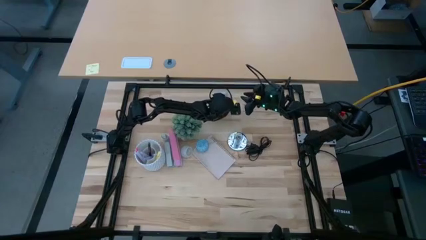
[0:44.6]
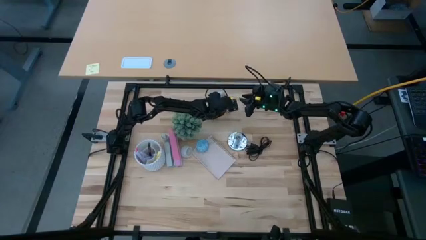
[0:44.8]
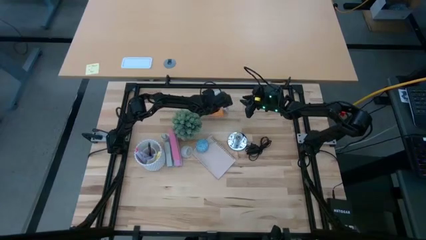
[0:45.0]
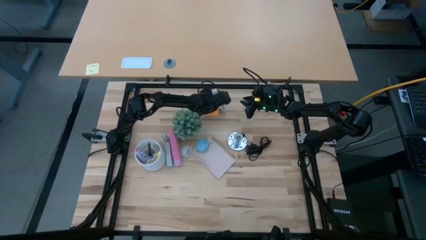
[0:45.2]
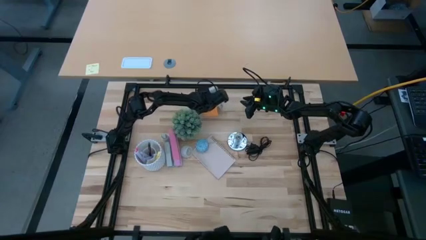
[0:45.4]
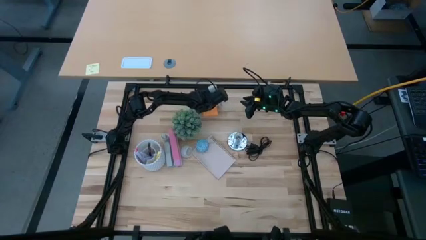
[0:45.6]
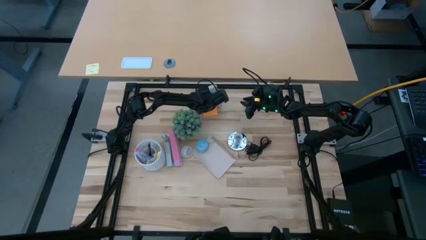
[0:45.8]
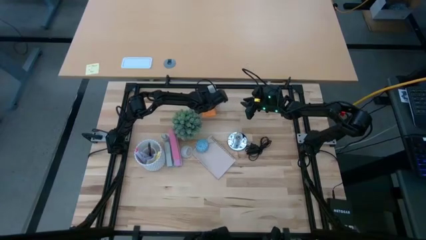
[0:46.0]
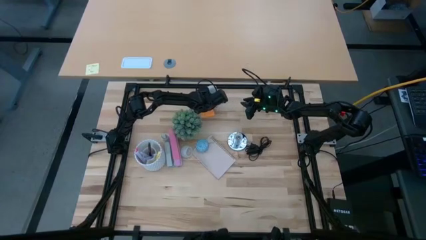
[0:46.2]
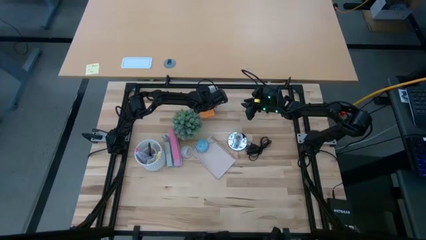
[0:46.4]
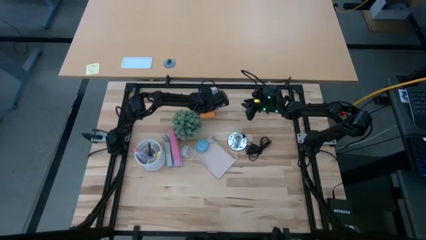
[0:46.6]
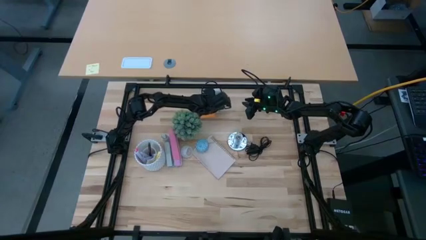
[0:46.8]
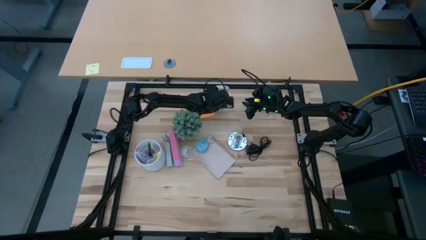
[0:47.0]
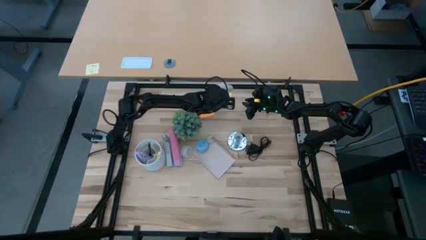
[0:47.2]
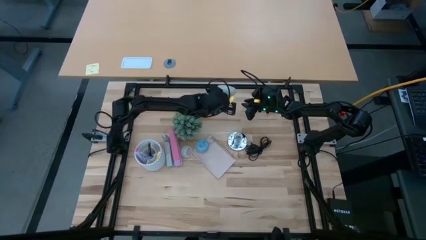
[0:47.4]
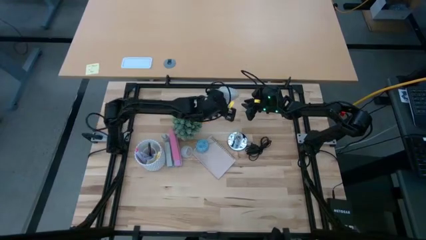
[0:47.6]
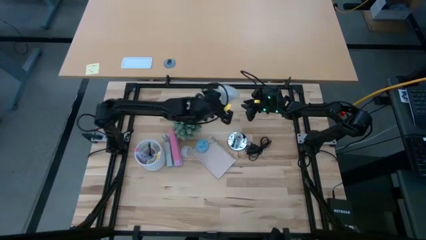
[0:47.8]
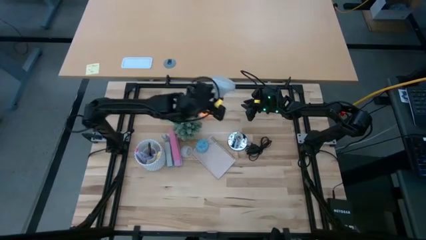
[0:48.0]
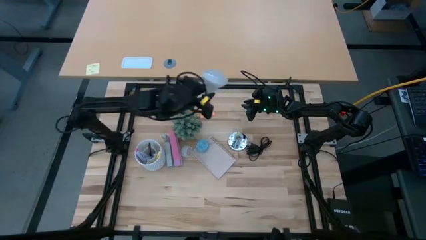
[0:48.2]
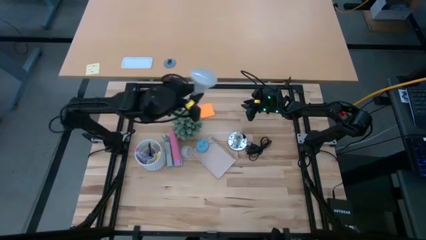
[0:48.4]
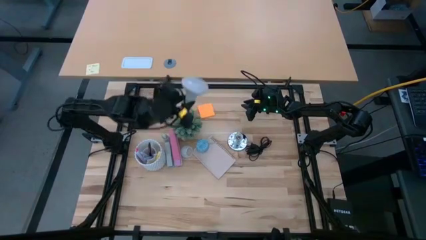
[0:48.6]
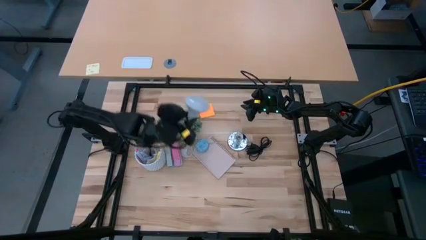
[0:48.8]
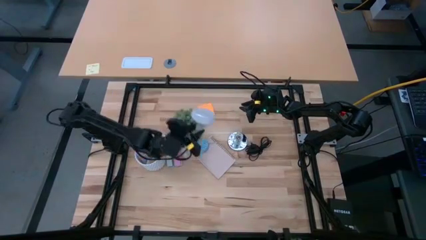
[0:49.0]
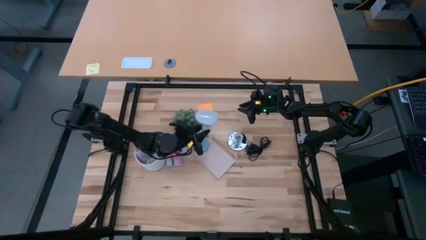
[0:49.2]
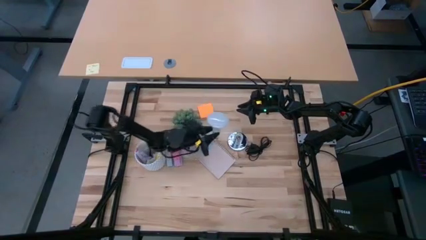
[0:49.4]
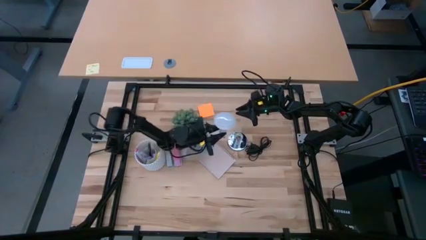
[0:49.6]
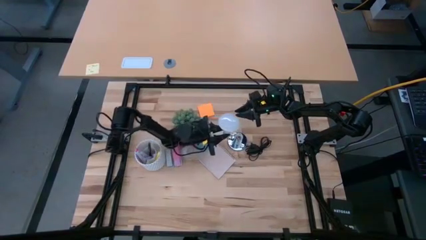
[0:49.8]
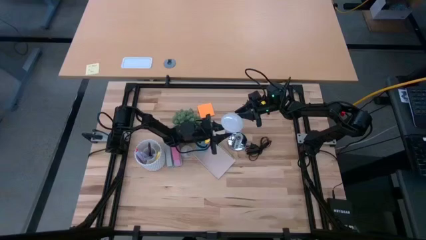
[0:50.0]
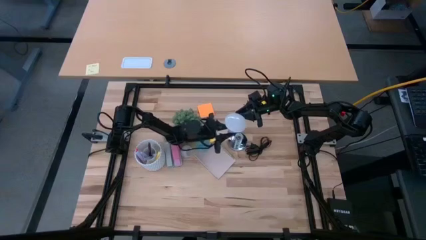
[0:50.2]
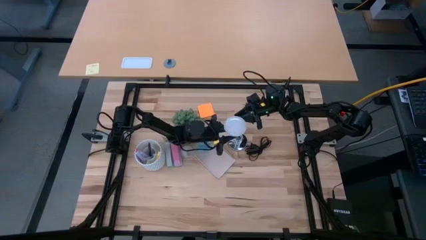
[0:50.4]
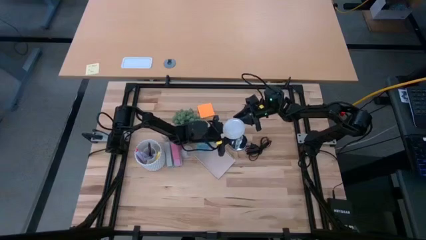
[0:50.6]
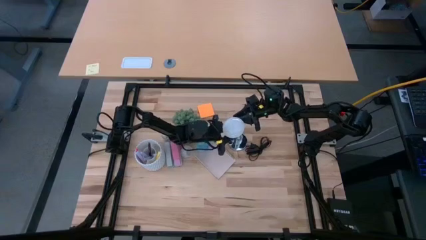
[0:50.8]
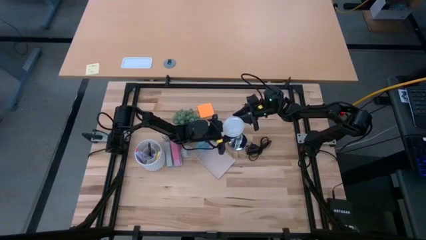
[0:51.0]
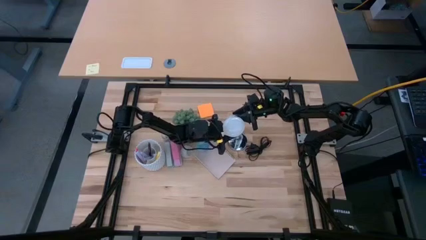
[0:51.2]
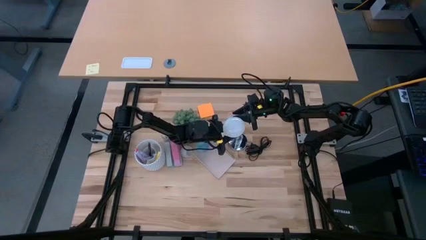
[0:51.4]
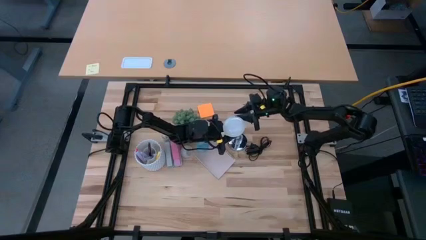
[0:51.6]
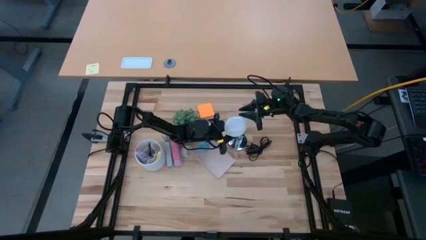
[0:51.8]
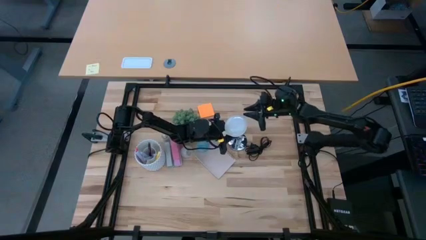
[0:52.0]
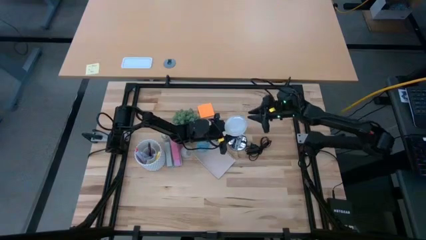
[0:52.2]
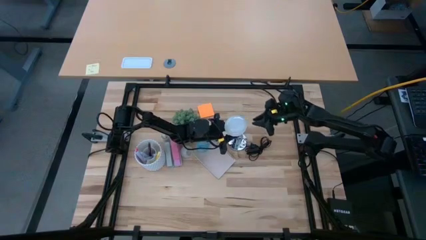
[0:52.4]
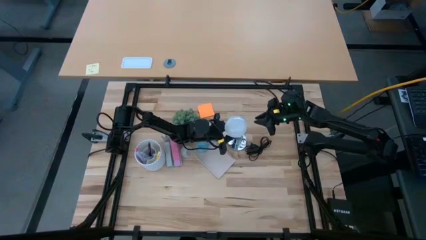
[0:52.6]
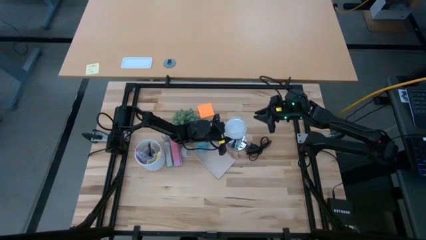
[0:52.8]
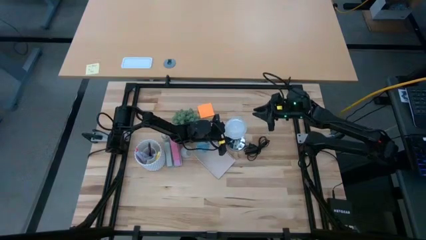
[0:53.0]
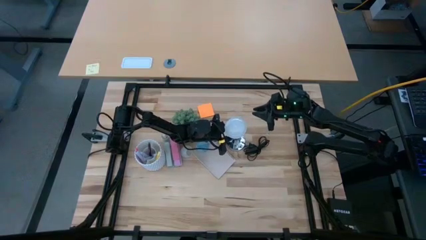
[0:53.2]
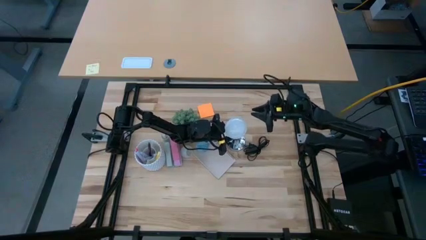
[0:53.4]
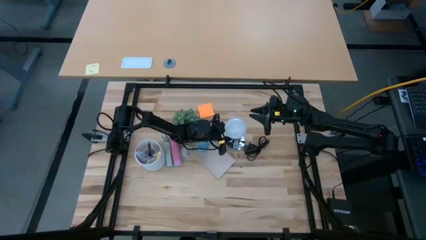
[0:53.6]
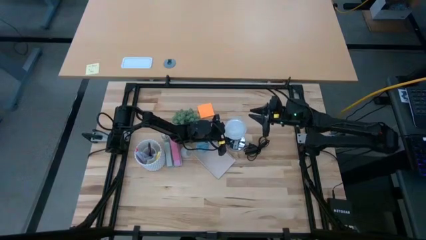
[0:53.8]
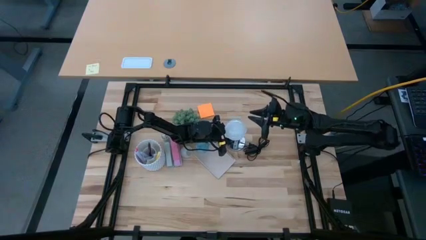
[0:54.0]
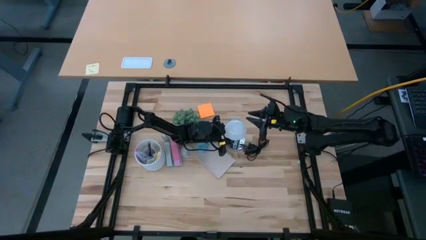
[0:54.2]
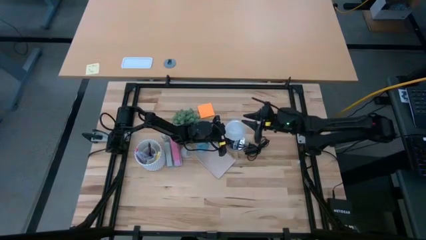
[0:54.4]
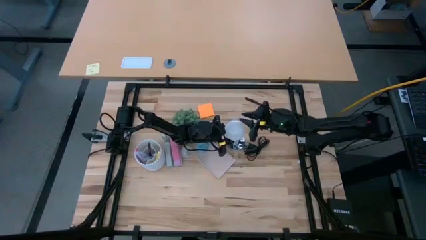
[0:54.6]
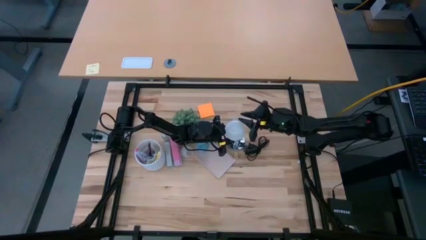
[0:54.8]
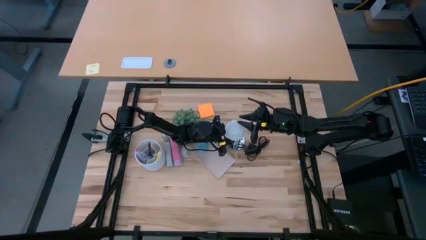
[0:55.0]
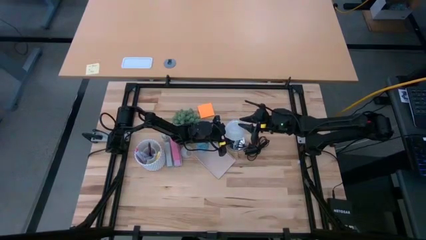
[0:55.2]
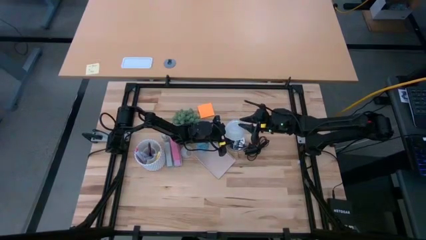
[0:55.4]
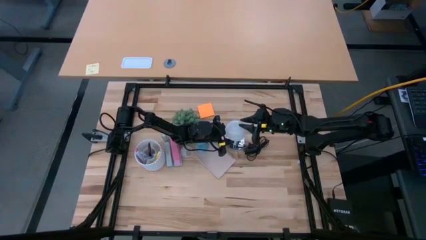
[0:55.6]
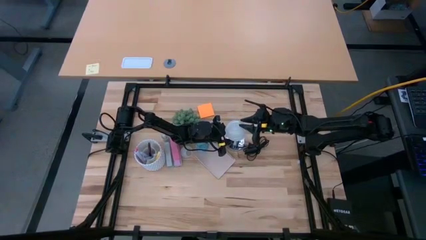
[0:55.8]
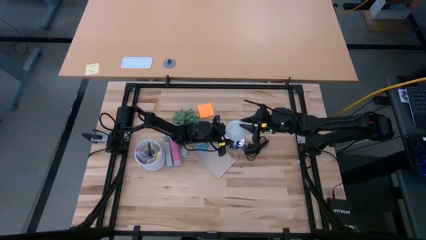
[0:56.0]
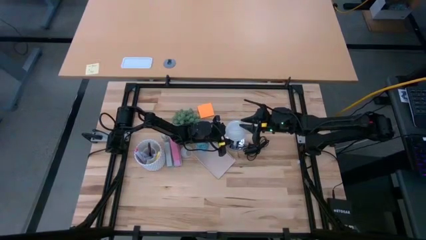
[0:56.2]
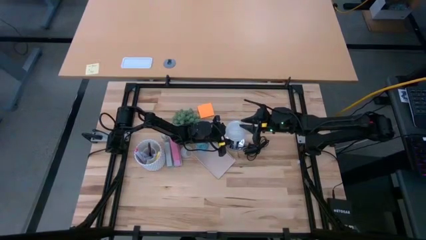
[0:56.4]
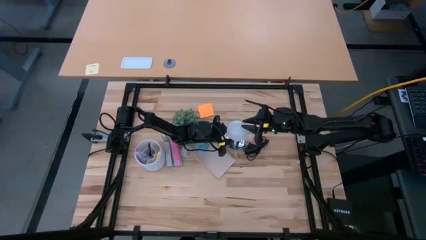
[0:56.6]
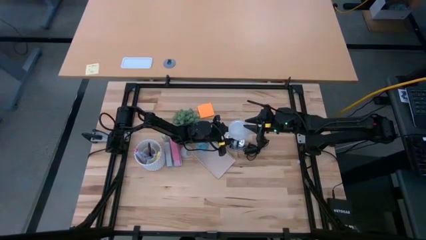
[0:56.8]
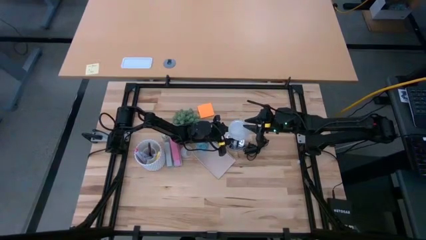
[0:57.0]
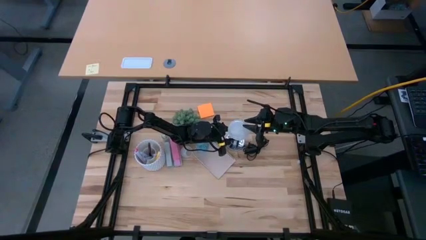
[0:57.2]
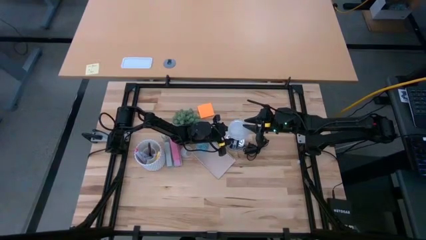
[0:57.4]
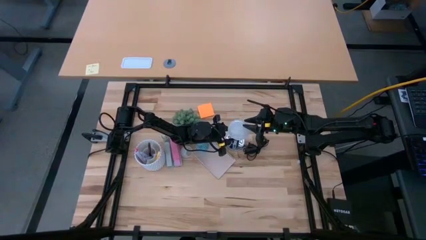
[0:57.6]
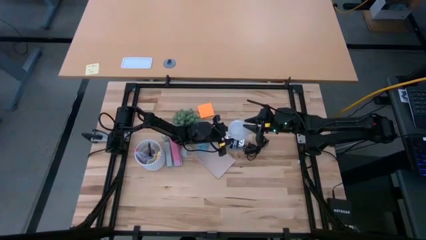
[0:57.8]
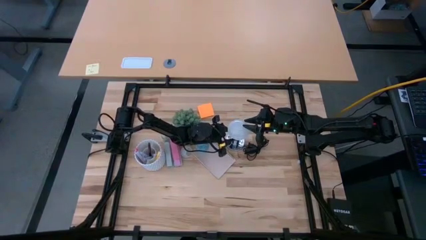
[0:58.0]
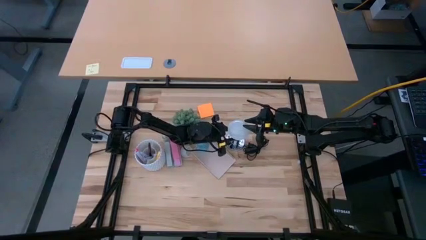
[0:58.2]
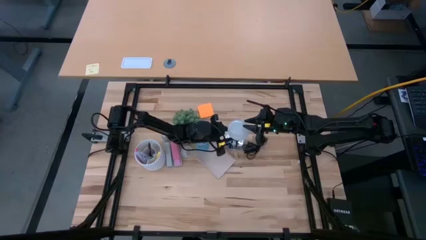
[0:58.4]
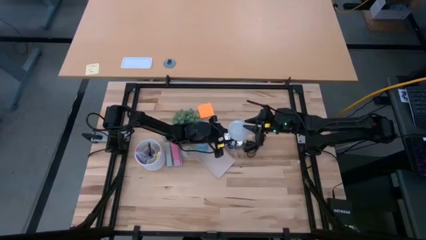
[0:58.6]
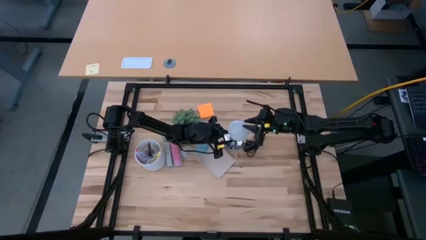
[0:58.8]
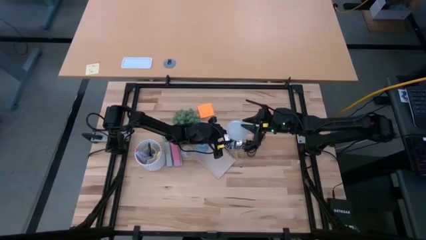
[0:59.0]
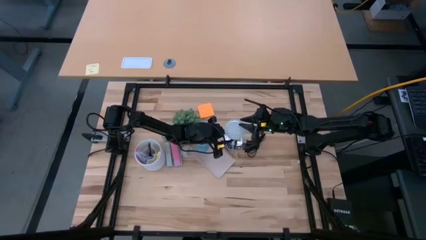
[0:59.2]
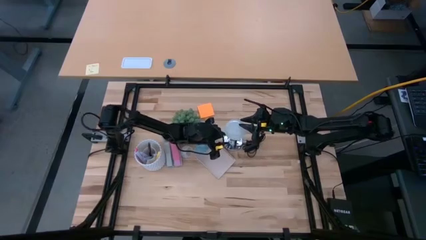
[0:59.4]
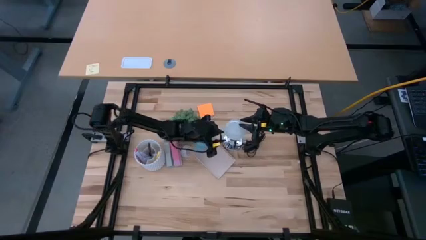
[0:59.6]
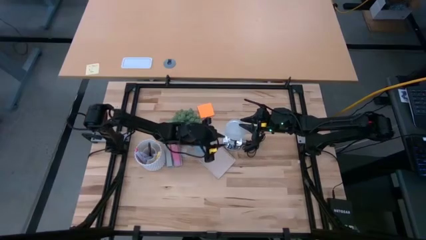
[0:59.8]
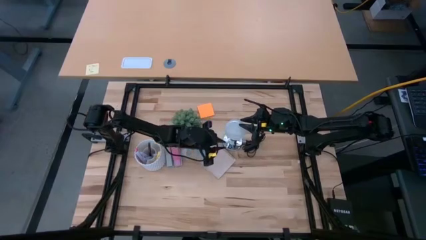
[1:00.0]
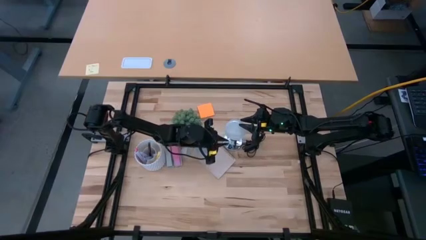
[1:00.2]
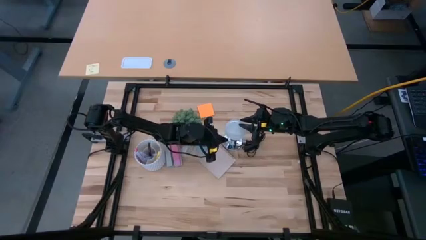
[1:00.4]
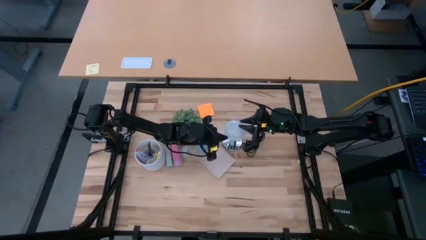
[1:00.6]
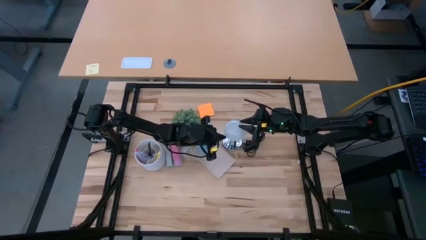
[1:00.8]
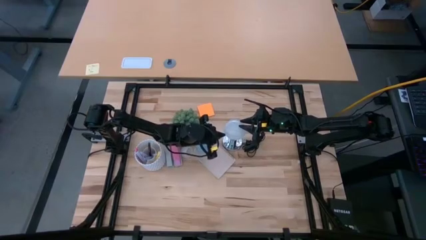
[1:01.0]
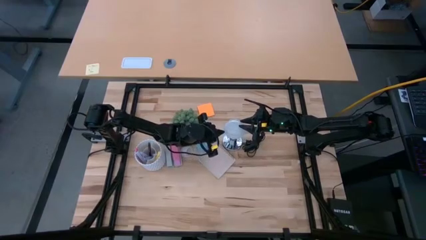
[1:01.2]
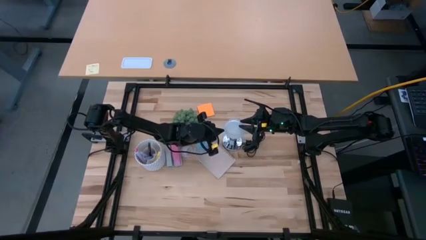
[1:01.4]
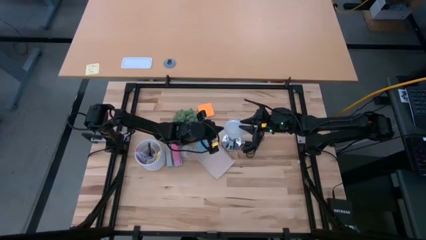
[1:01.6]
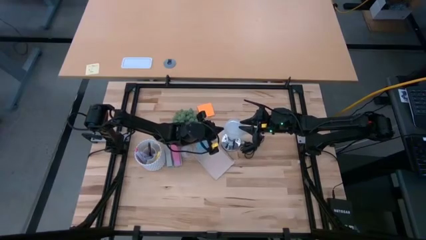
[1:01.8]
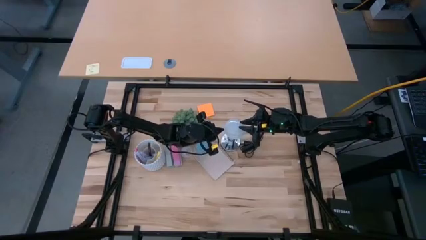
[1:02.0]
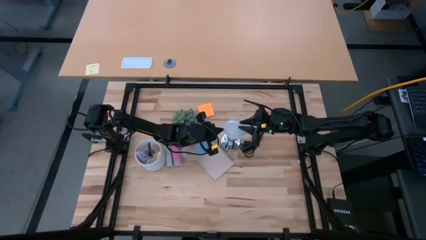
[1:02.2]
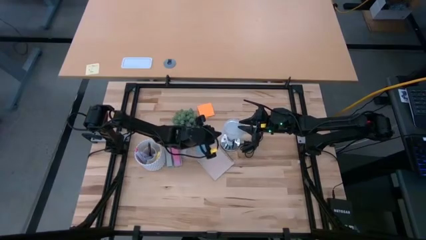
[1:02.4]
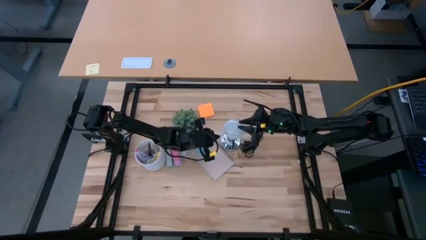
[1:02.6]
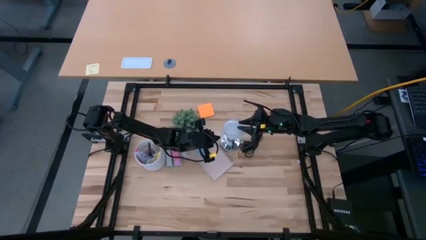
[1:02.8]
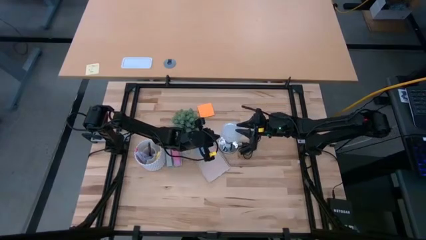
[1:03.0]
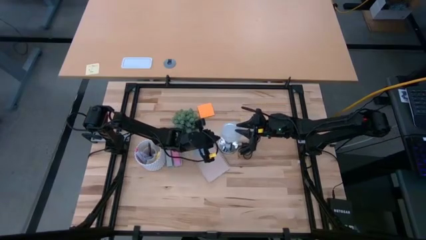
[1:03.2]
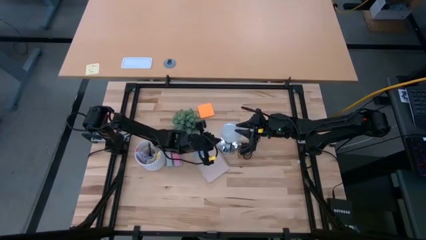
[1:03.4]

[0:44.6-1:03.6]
Task: Screw lightbulb
Insert the lightbulb into the silver lamp socket
